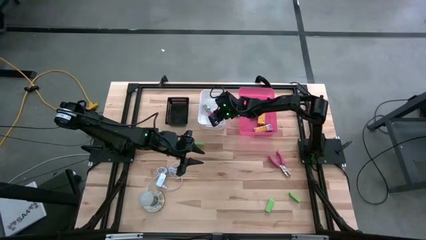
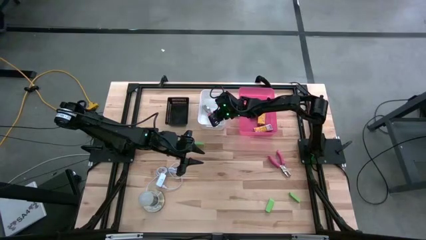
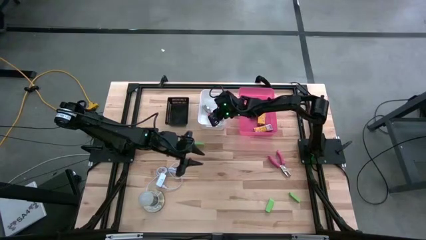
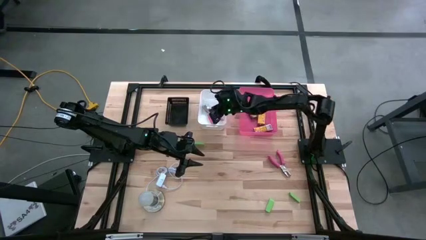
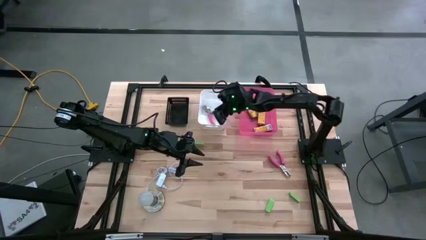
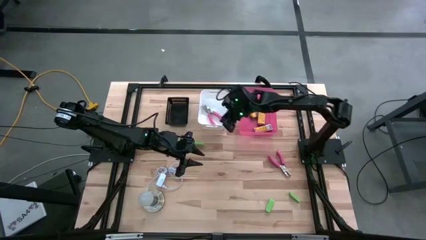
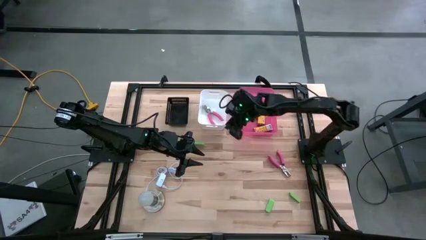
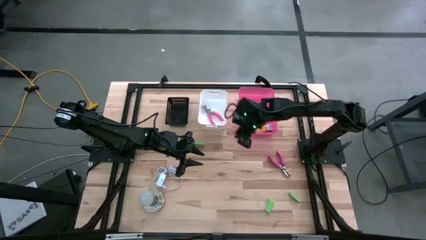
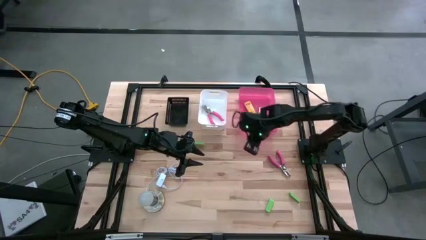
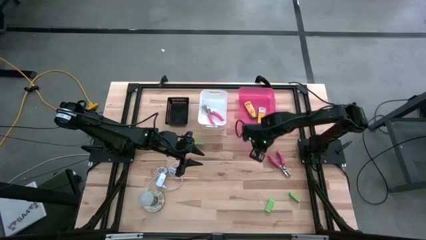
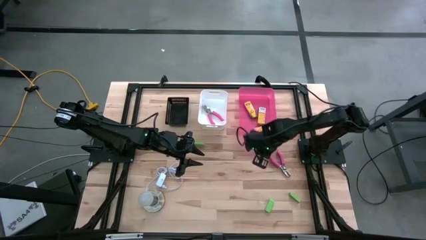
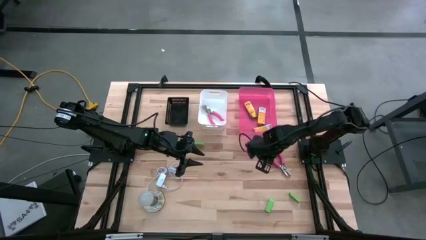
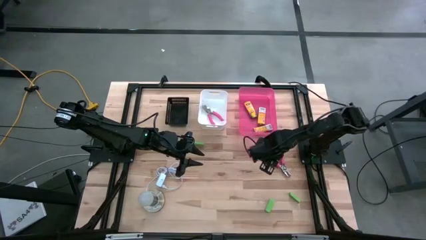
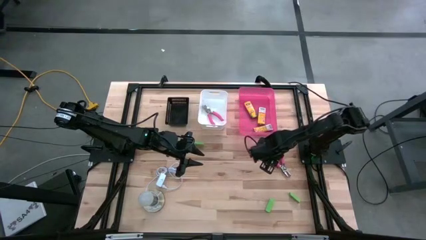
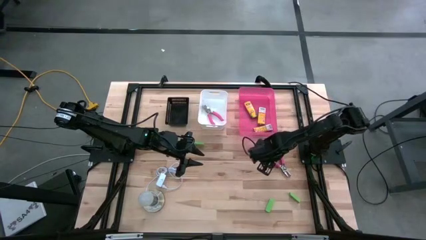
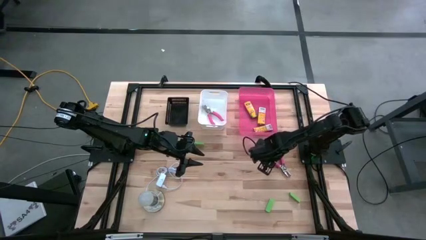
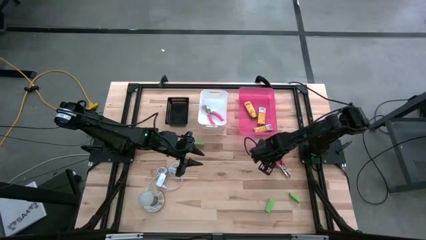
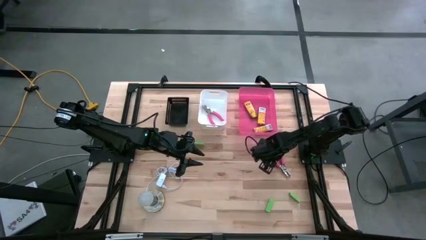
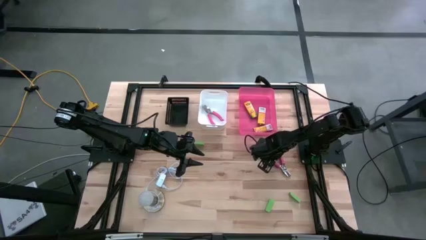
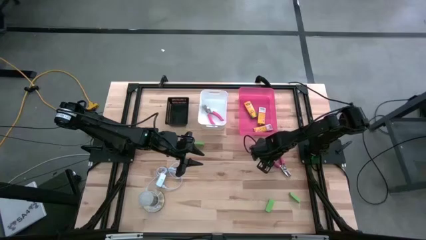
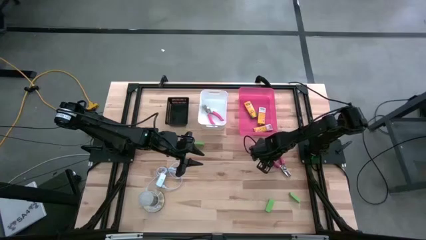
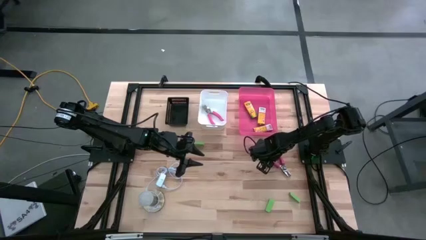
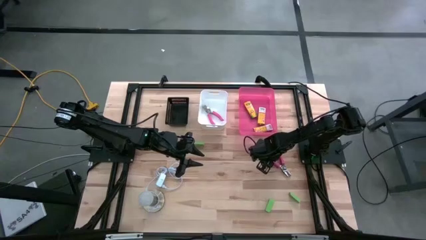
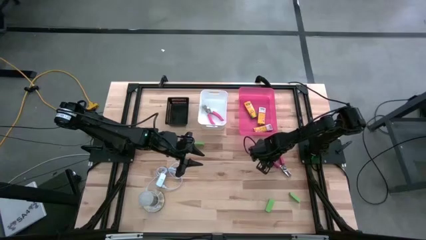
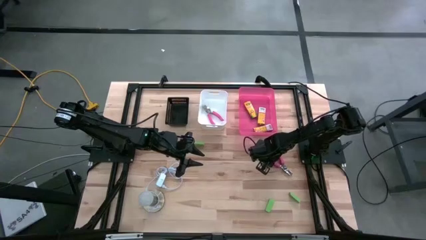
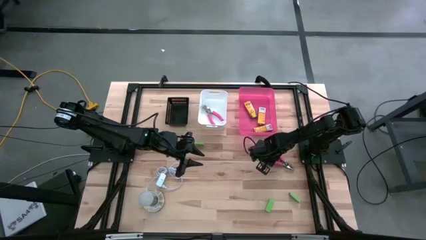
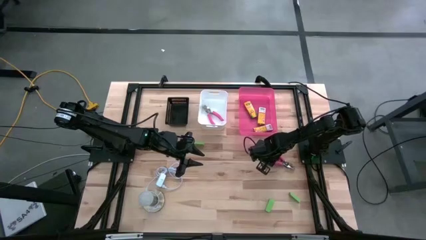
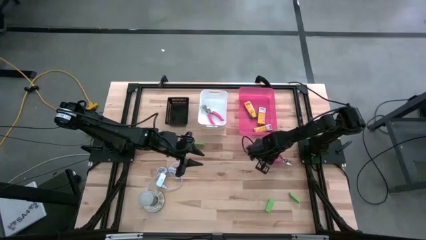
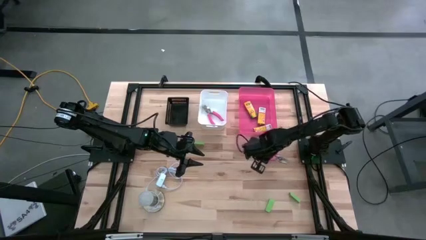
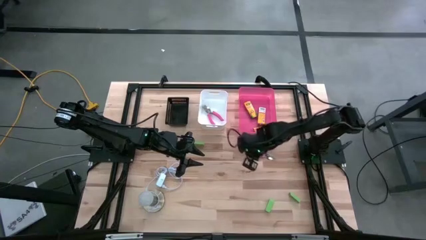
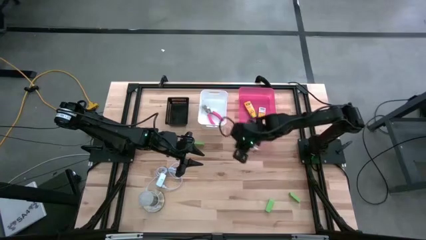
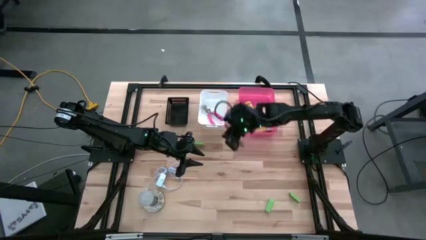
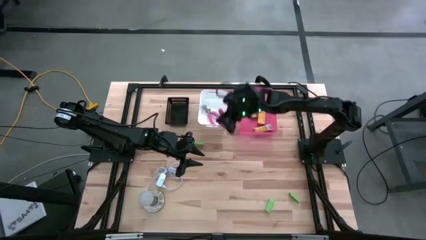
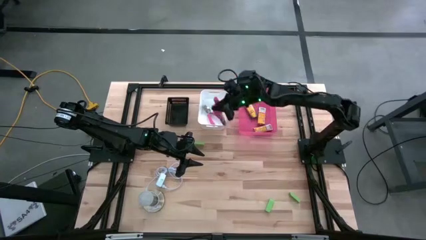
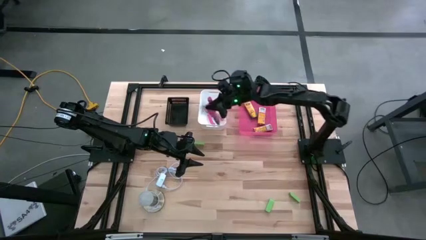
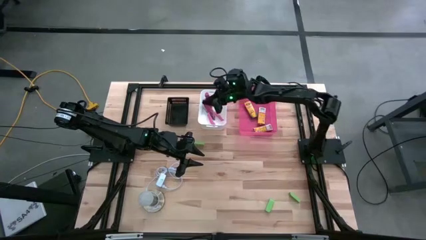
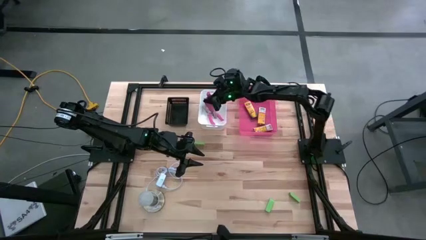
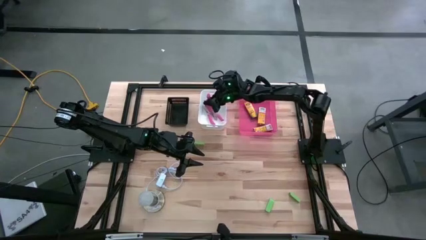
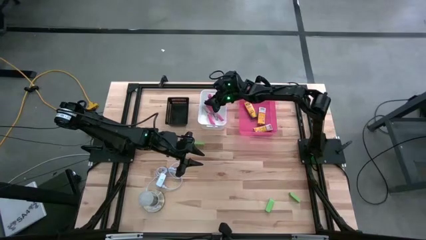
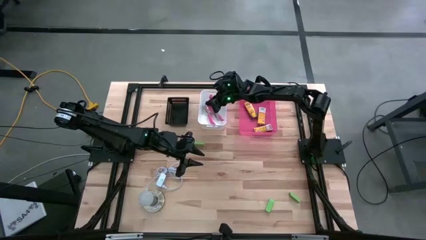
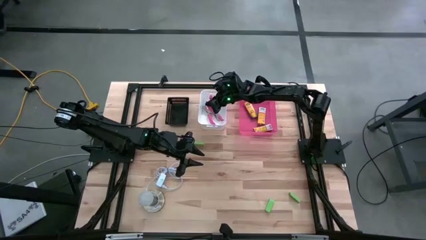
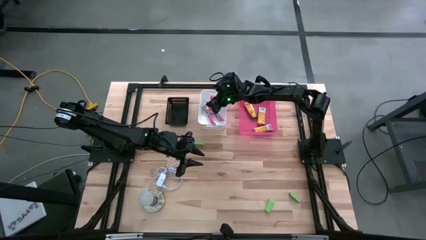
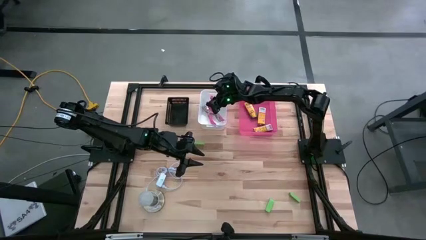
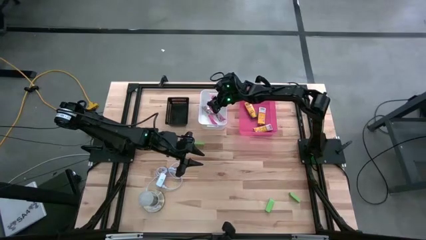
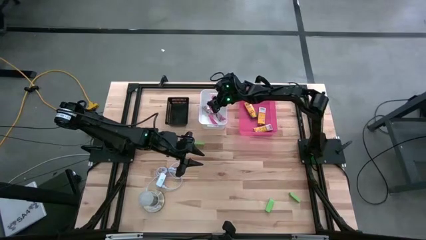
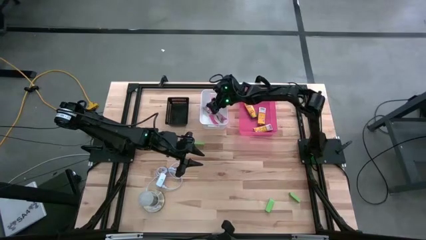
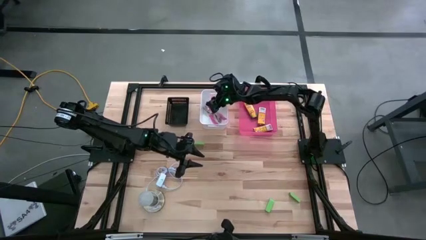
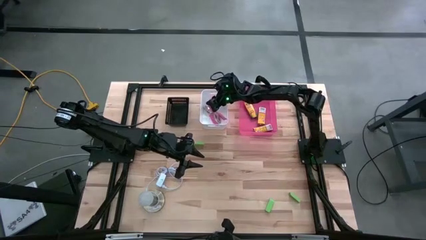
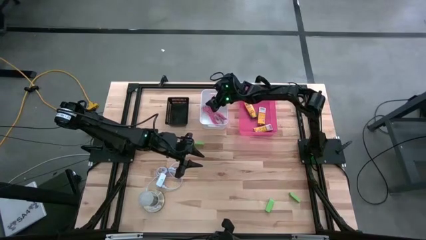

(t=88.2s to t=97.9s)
Task: Pick & Place School Supplies
Put the pink hole puncher into the white bin
